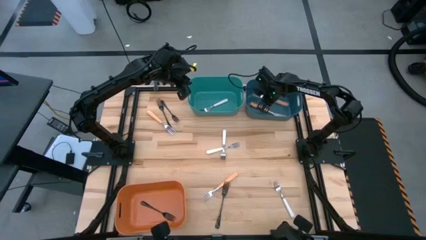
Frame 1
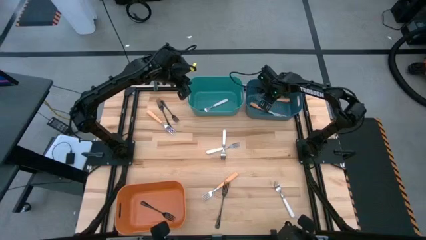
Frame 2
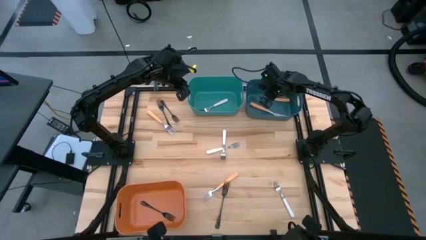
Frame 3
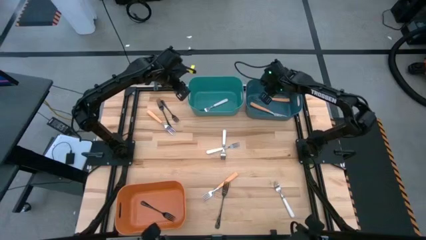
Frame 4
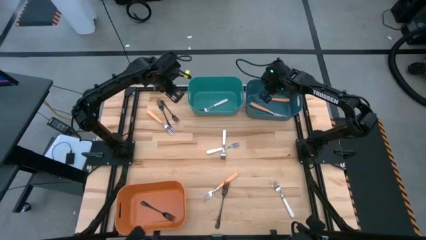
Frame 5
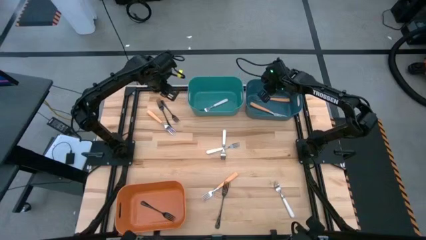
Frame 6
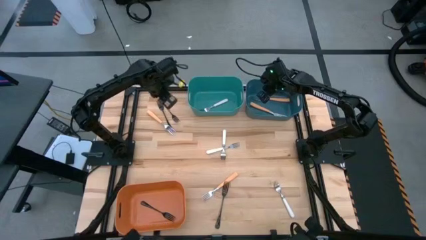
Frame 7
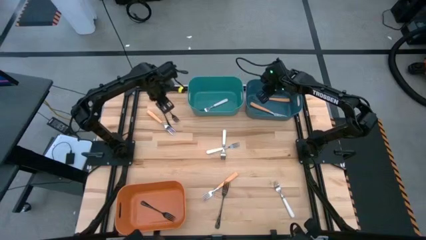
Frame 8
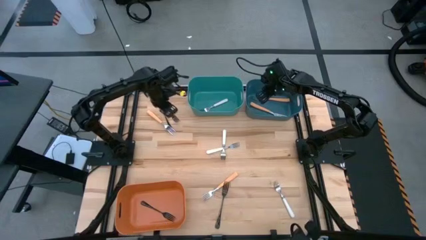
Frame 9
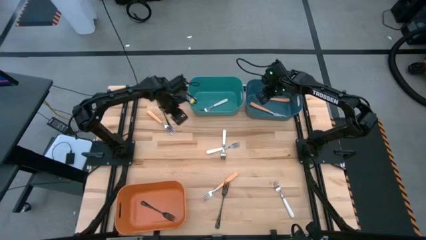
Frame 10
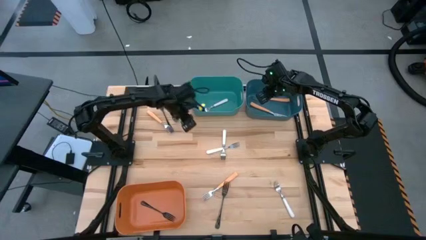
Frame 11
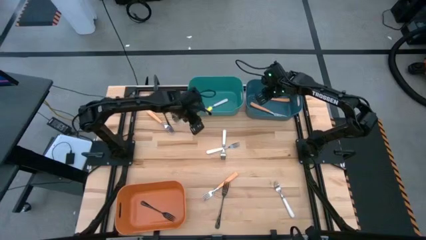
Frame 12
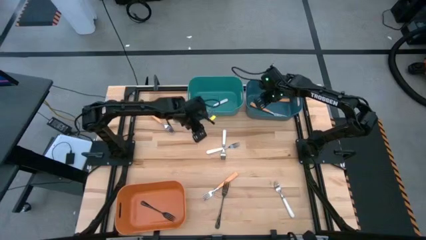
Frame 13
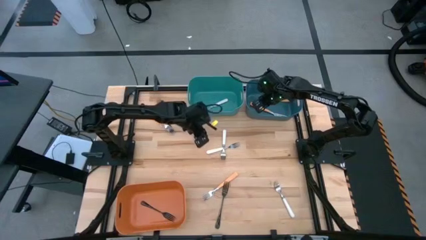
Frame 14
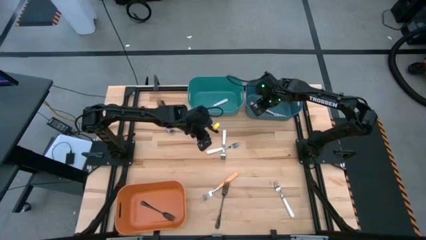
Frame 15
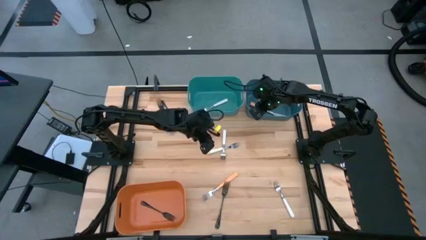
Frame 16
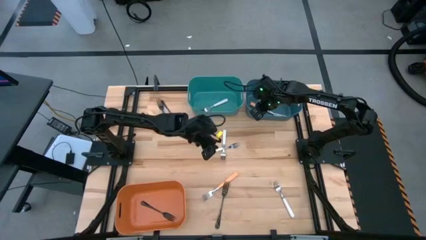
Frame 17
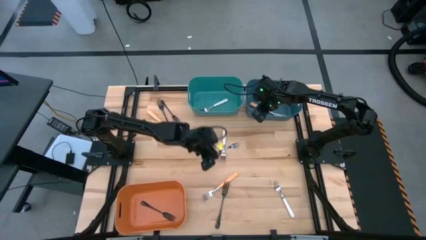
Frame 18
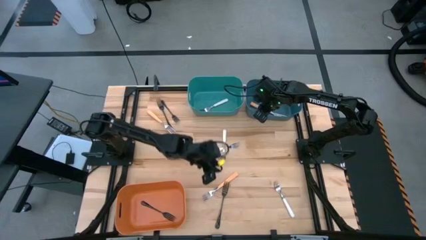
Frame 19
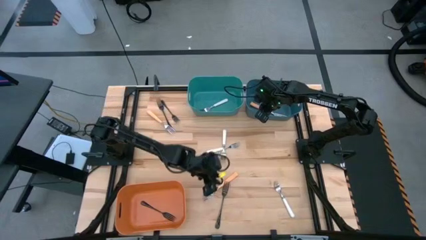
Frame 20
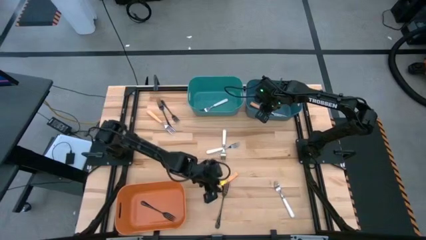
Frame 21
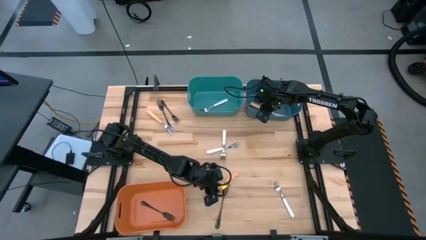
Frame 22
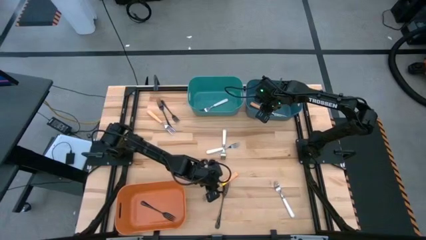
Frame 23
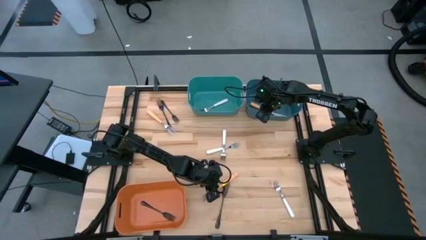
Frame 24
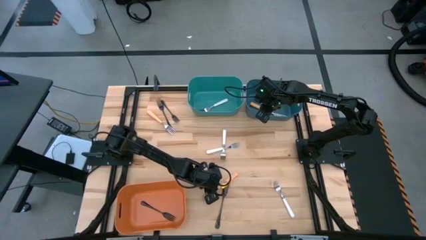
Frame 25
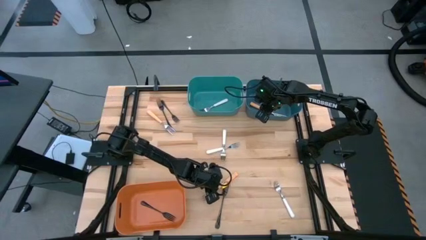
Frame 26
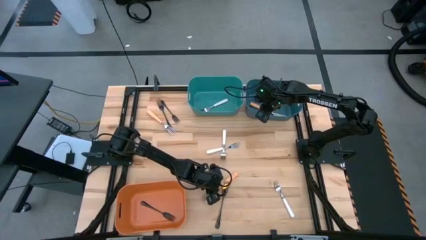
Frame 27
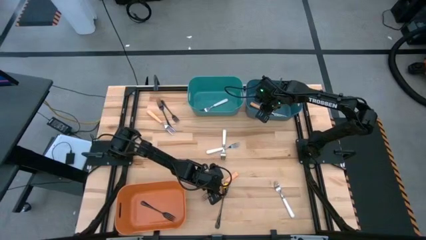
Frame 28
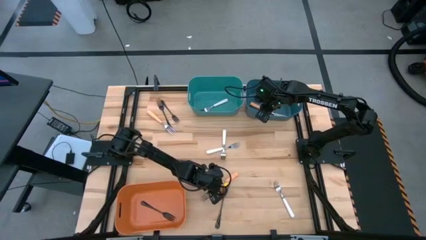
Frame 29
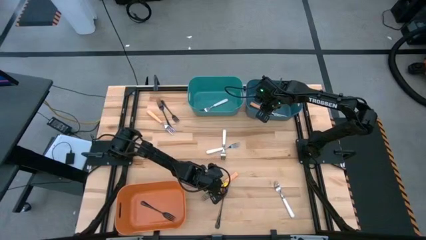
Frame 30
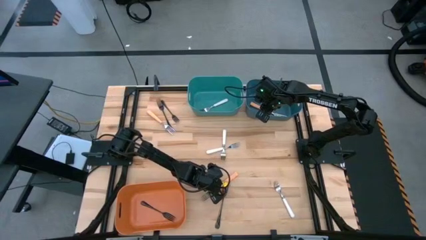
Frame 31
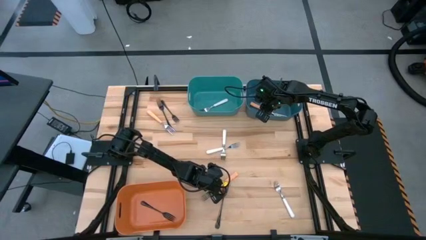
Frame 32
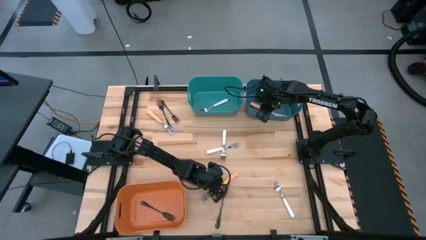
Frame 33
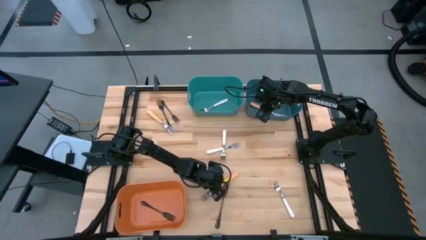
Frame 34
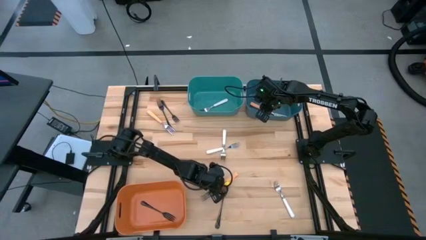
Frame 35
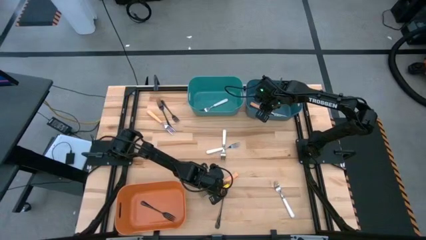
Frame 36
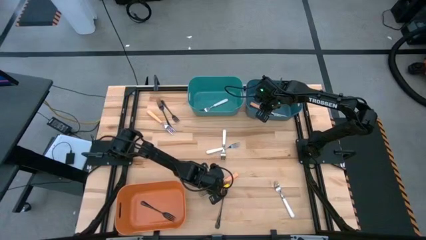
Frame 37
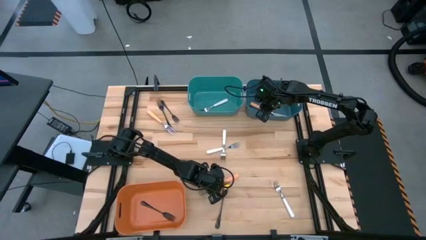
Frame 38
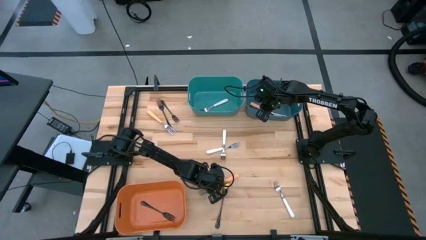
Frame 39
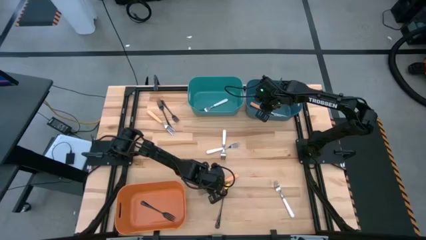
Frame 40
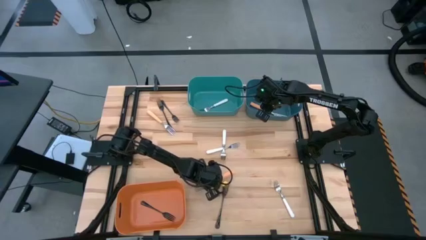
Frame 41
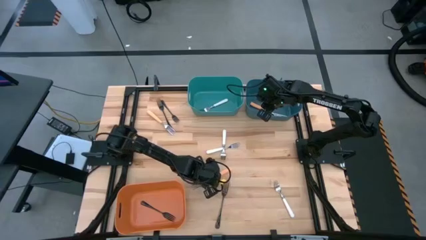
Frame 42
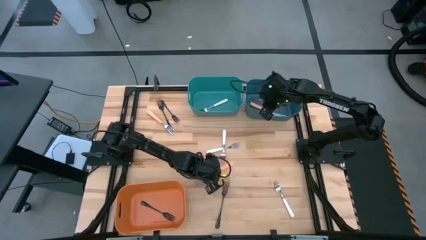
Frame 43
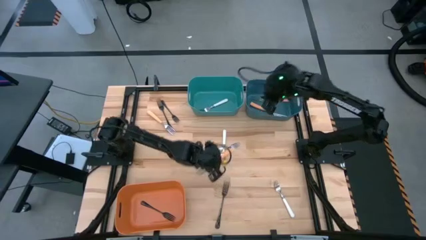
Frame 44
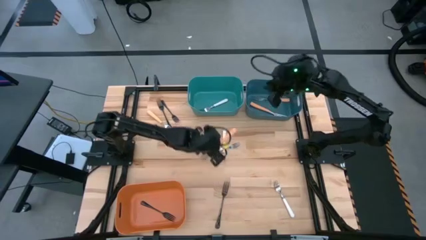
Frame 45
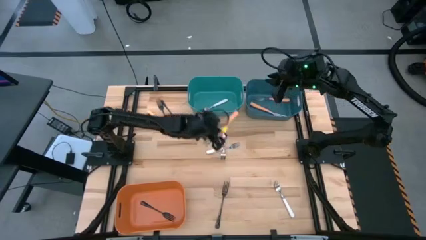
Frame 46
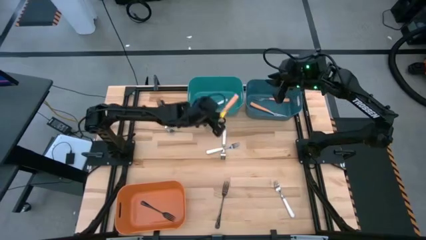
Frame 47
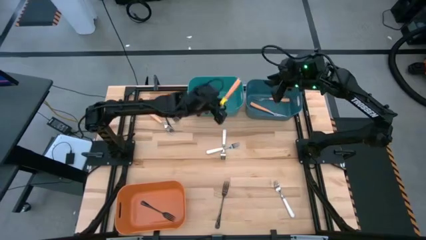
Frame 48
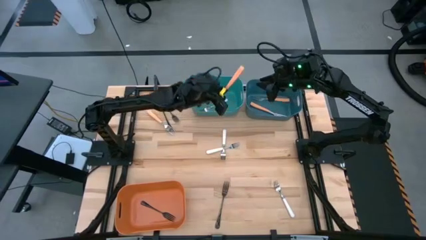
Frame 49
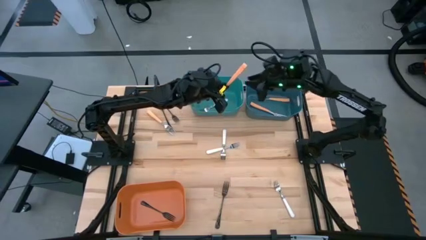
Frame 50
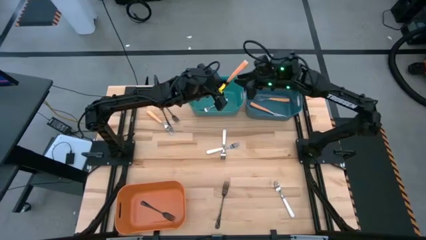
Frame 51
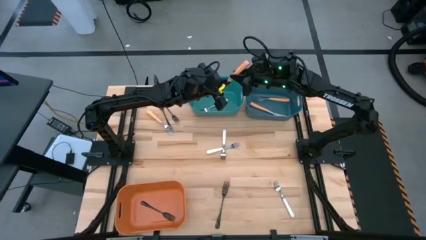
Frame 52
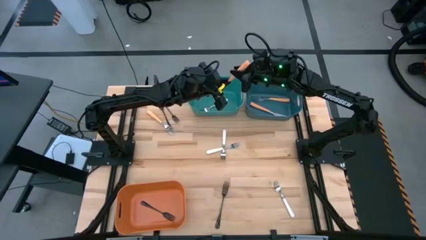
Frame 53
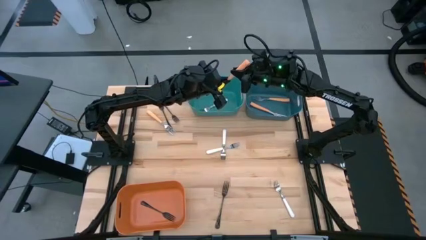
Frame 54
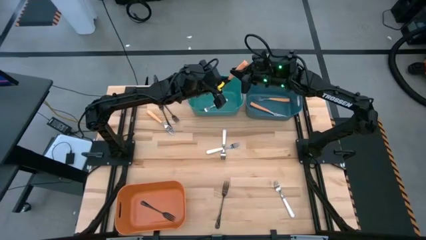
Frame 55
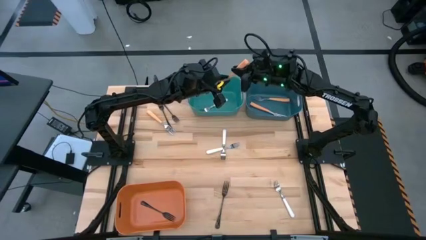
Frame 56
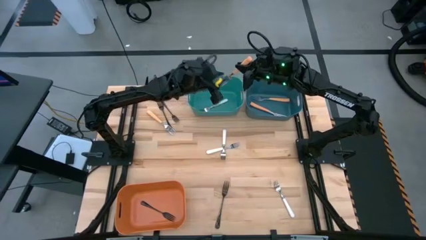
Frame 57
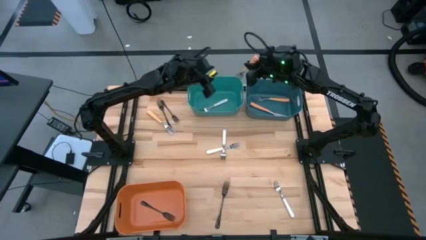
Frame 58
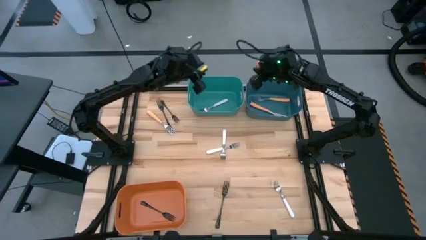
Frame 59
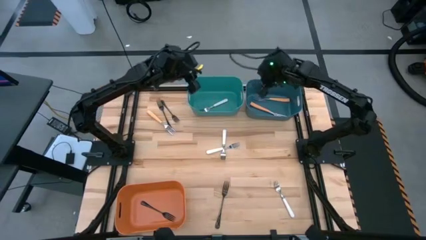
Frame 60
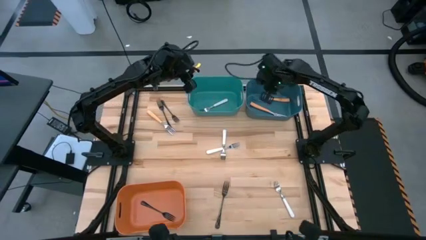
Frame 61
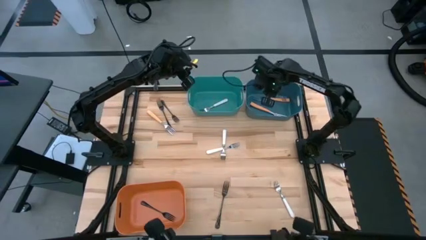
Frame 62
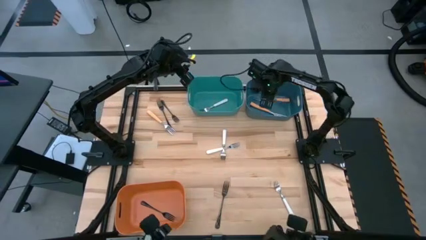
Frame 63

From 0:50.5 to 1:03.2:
Task: Sort silverware by color (type)
Put the orange fork into the blue bin

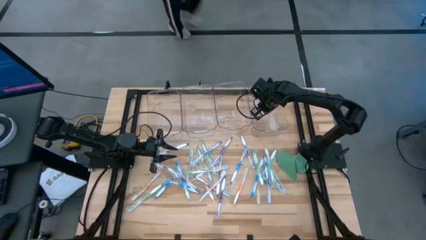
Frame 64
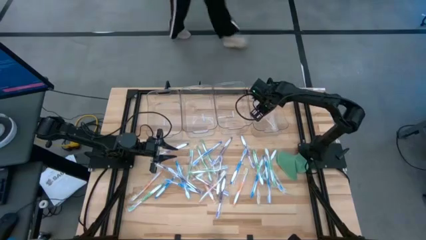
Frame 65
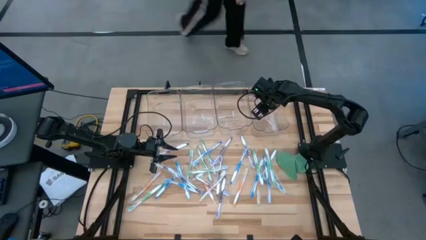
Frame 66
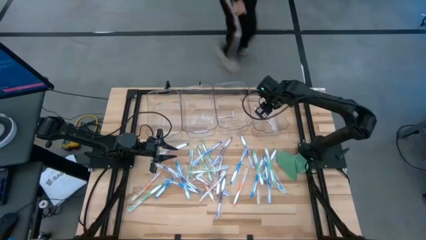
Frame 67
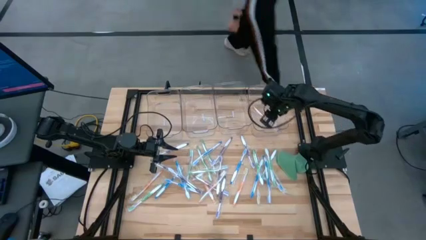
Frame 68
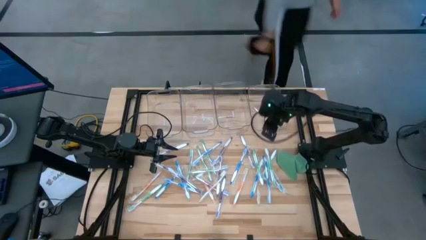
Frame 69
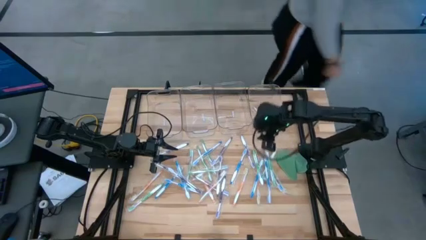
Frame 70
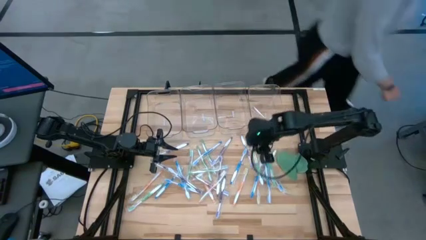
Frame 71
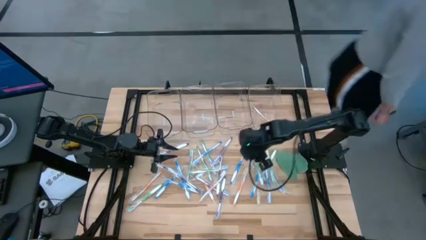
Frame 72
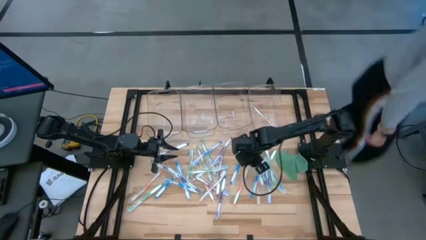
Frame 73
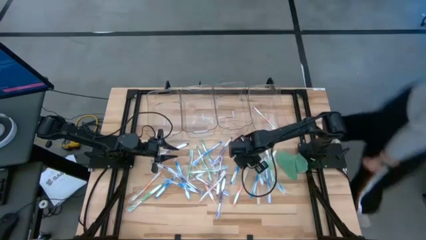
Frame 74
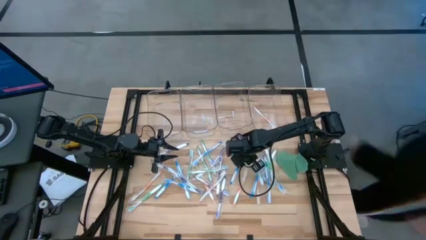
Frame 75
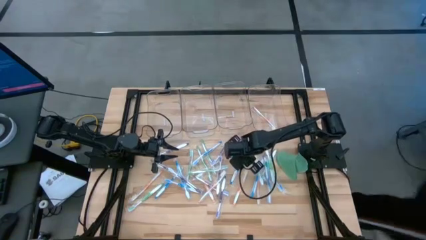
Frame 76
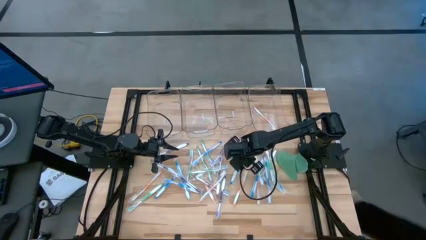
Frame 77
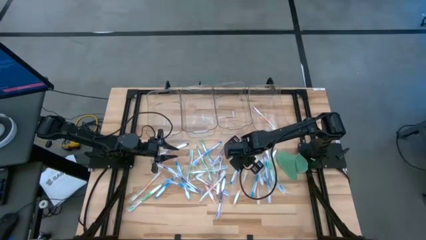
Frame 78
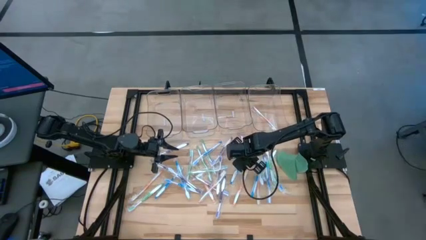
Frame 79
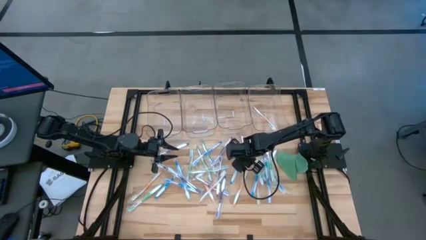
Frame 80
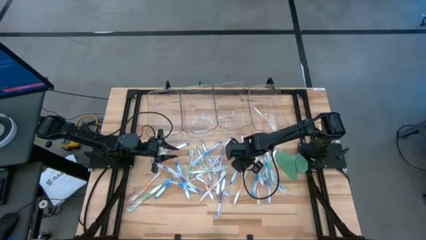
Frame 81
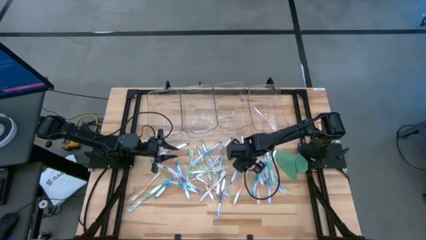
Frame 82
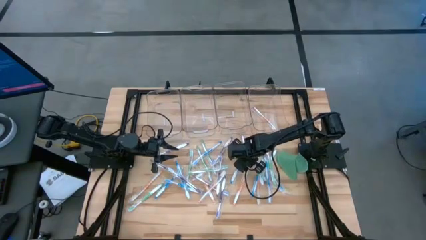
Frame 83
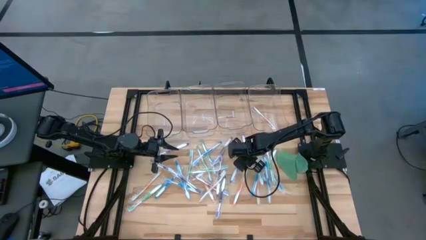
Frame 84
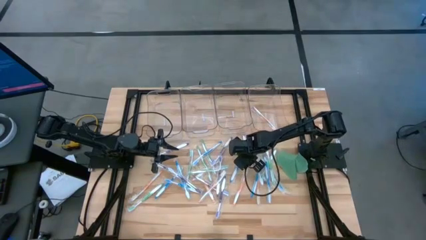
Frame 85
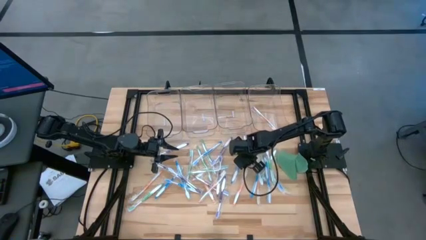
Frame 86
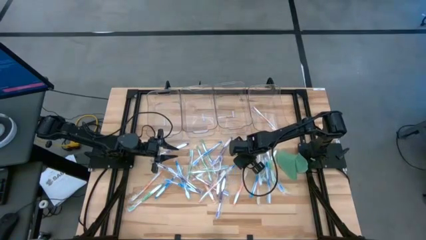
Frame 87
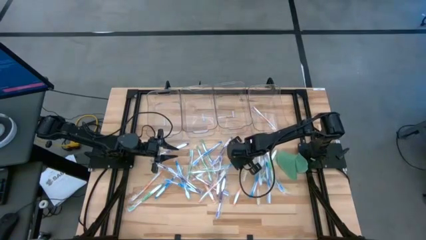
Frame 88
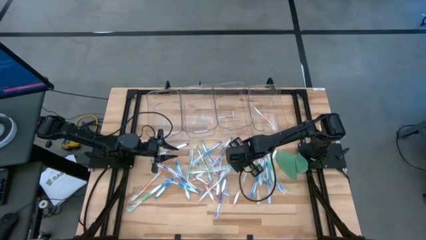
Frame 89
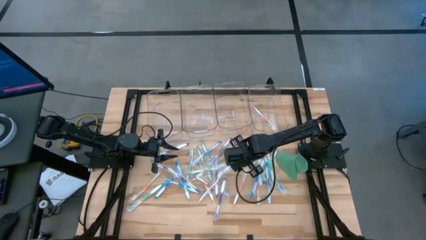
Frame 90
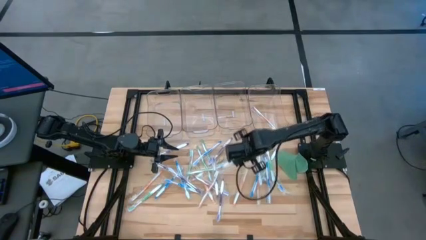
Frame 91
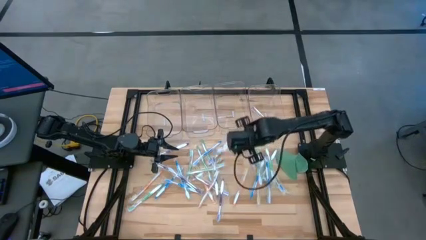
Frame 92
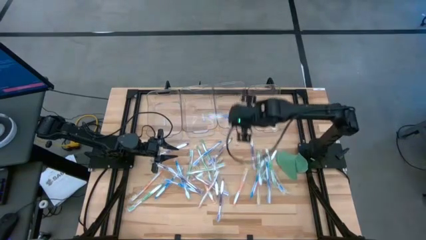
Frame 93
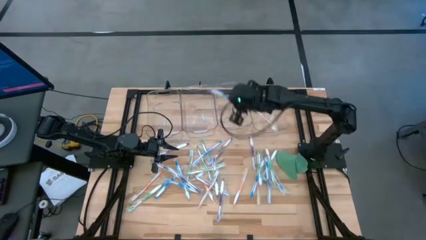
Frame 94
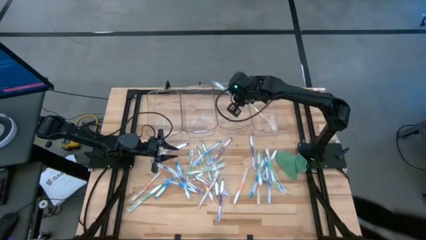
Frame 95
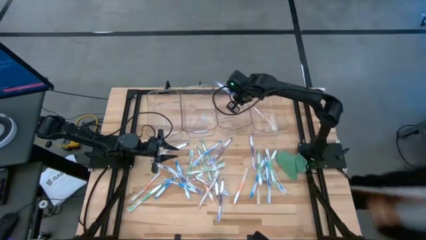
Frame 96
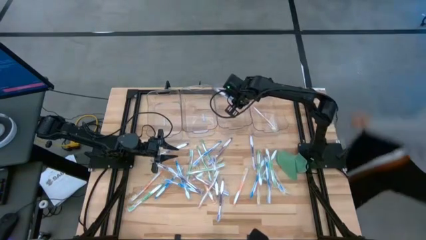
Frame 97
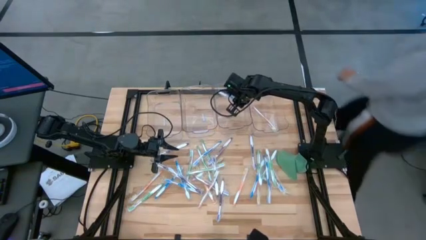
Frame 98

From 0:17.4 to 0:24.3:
Task: Pick & Place Toothbrushes
Put the blue toothbrush into the middle right transparent bin
